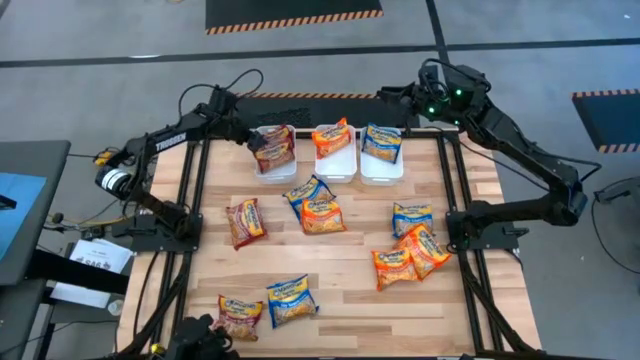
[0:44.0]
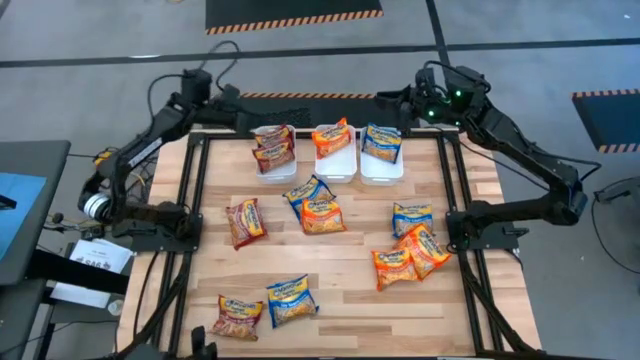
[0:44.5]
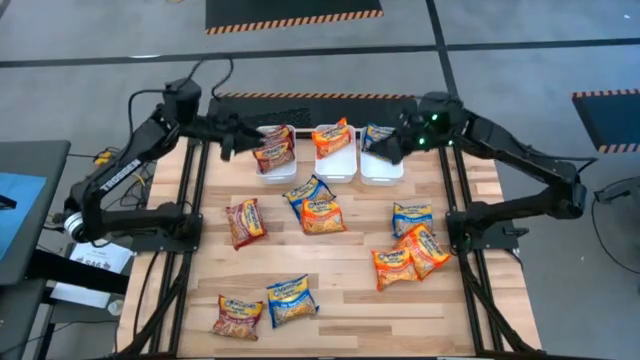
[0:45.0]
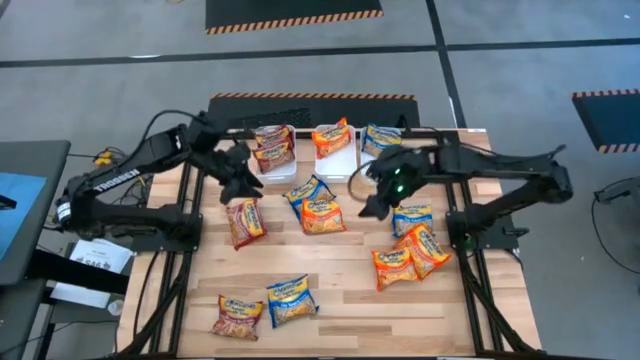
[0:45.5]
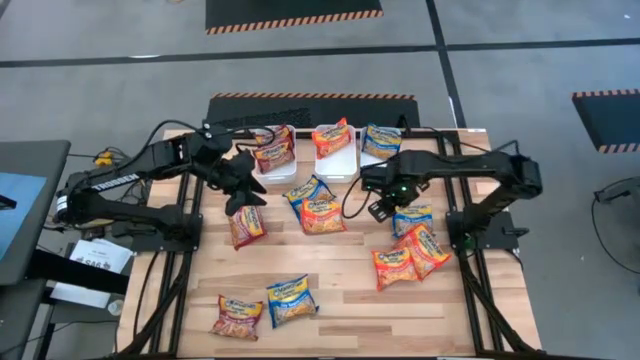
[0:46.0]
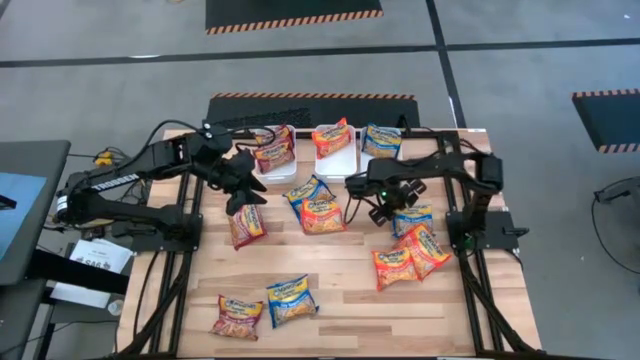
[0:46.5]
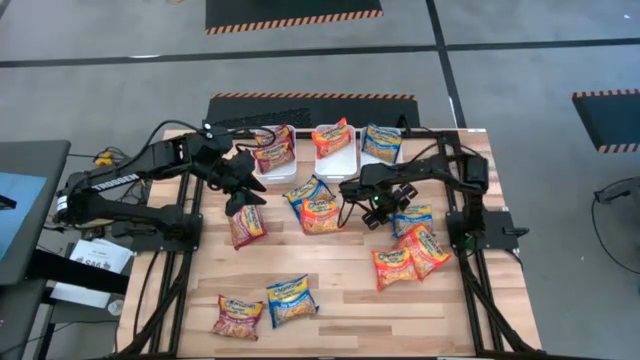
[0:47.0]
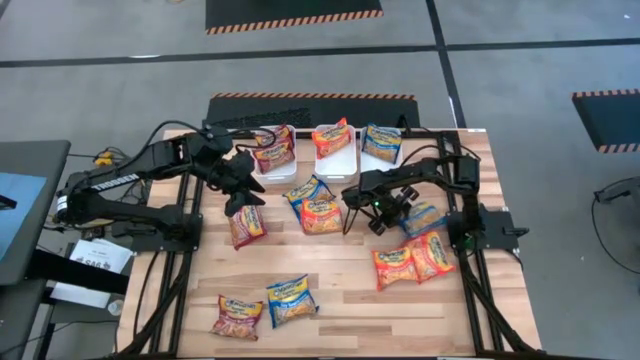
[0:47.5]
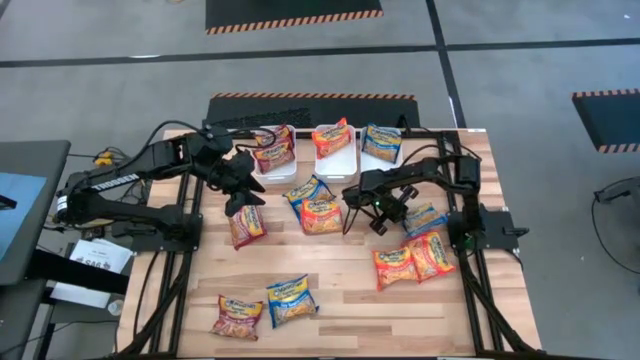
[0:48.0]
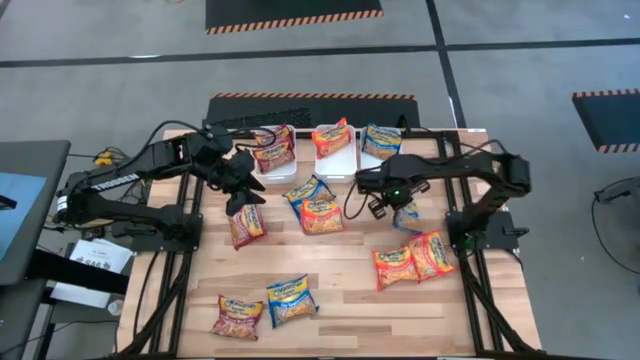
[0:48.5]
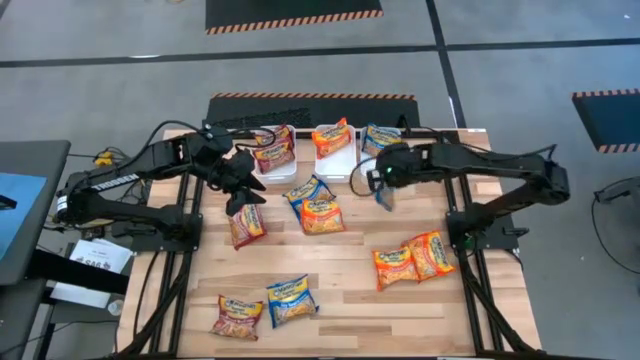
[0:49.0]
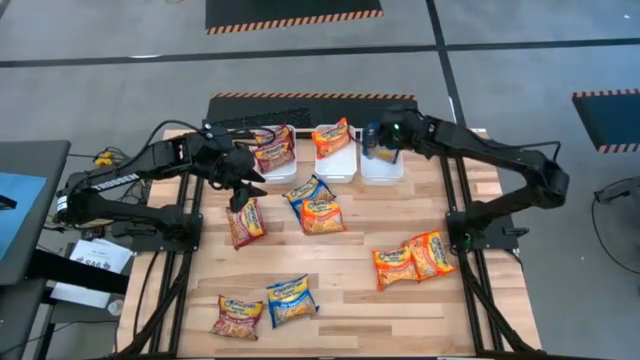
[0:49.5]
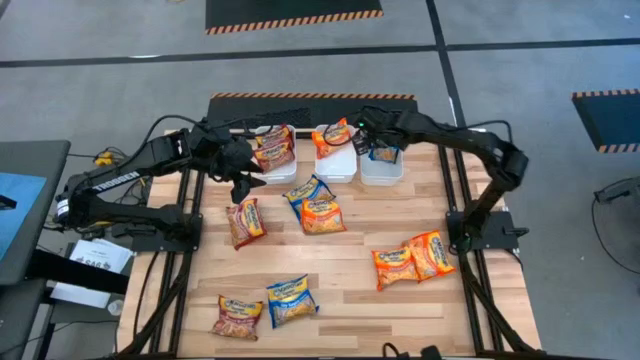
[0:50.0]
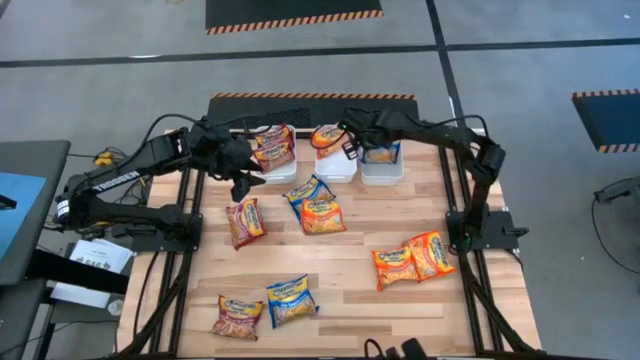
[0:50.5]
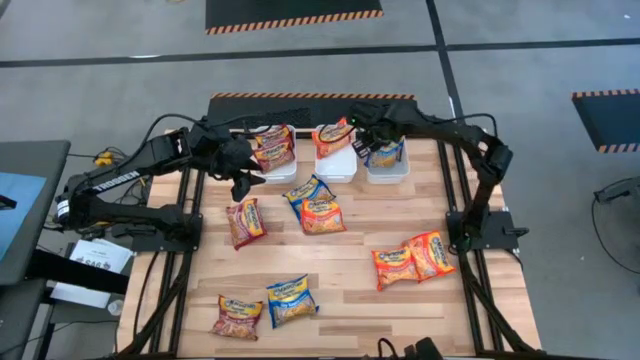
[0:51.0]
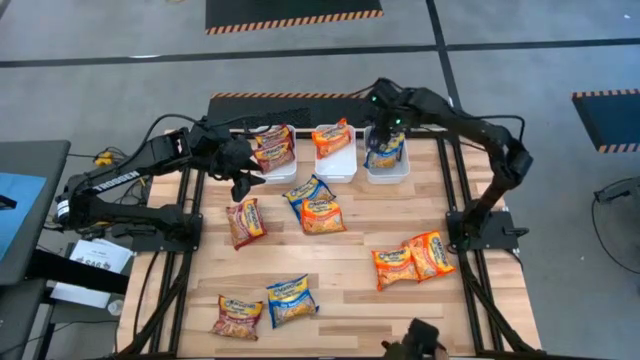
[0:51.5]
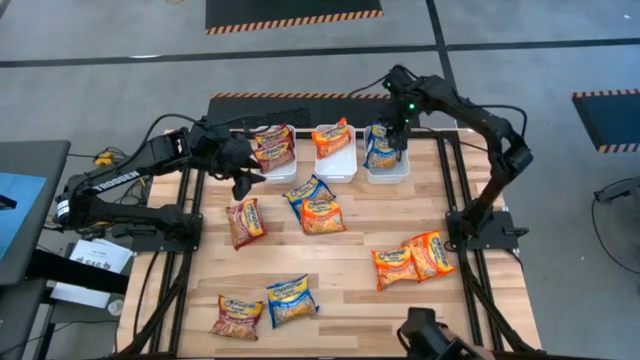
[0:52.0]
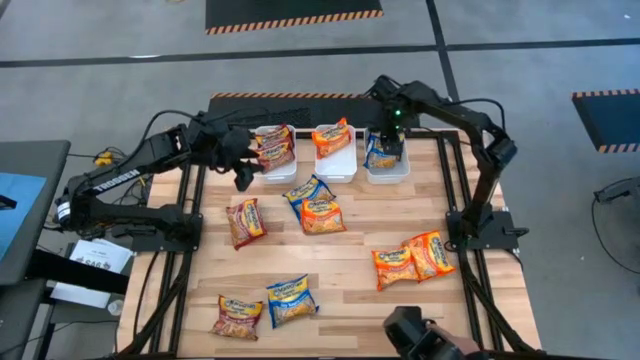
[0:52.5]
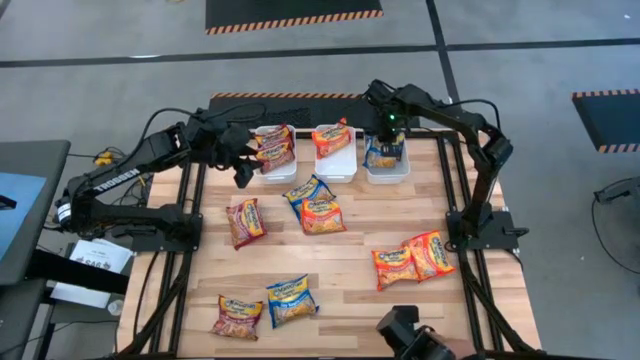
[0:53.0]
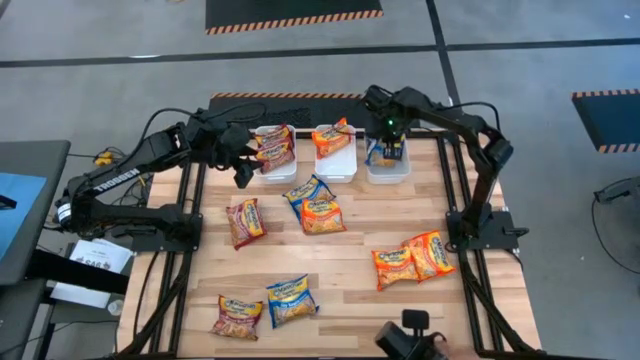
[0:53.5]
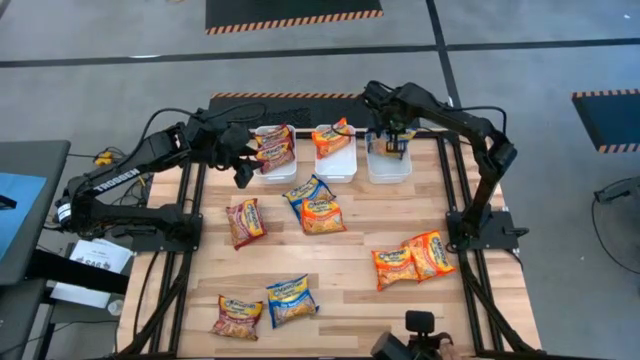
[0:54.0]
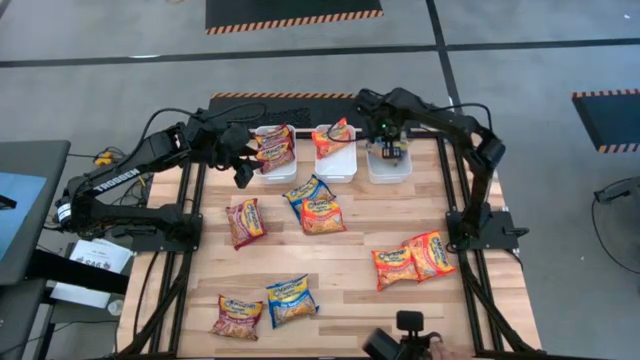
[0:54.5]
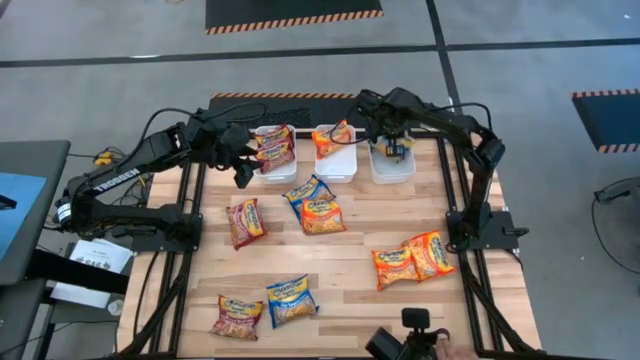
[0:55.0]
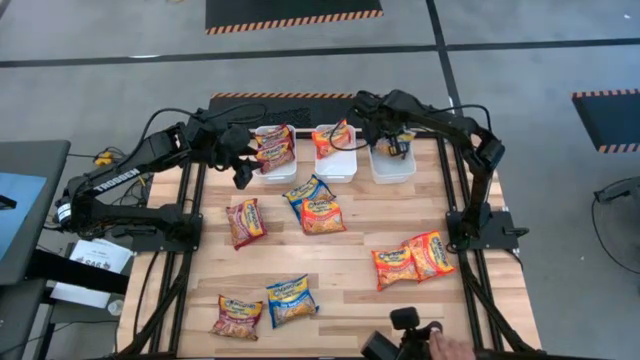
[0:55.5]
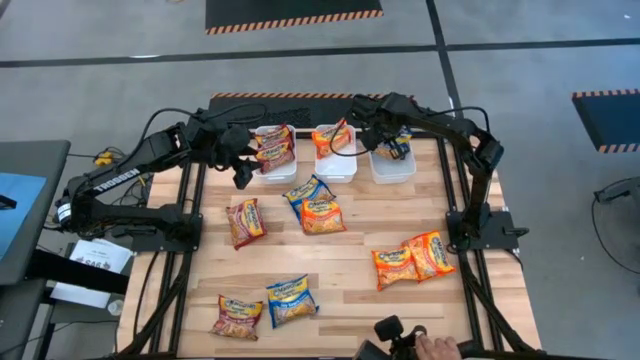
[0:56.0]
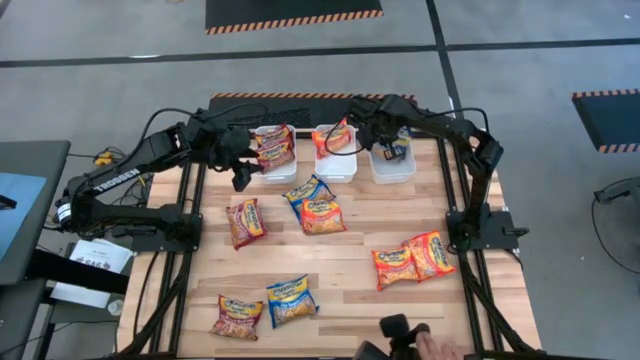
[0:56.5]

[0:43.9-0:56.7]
Task: Sort Maruchan noodles
Put the blue noodle pack into the right white bin
